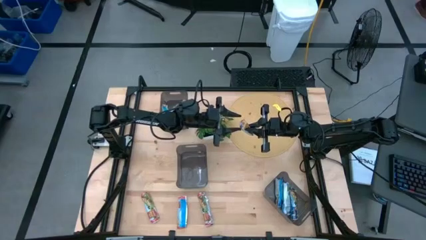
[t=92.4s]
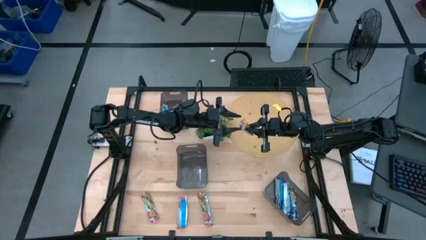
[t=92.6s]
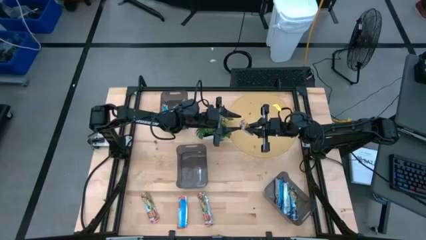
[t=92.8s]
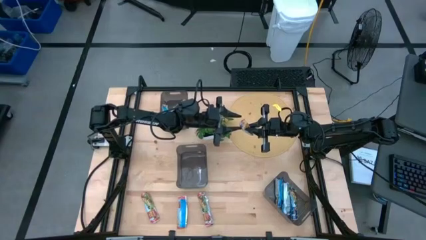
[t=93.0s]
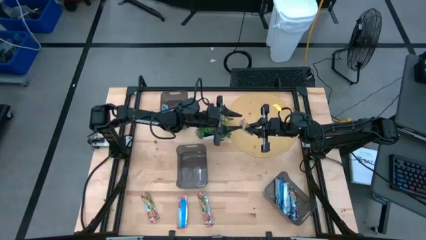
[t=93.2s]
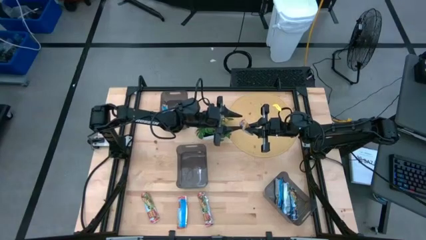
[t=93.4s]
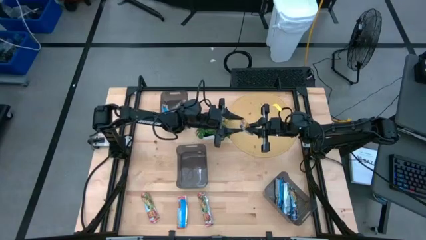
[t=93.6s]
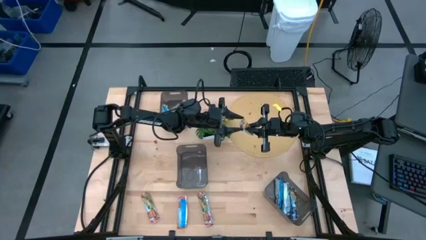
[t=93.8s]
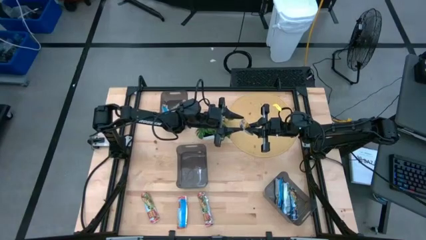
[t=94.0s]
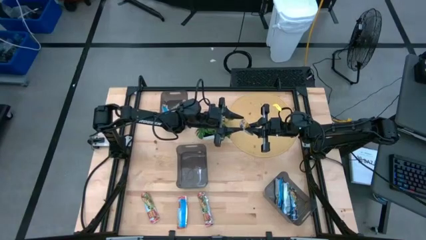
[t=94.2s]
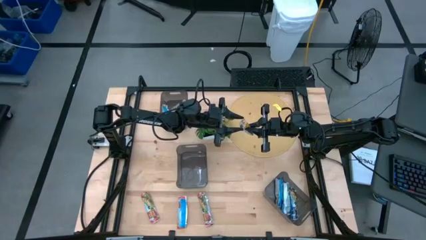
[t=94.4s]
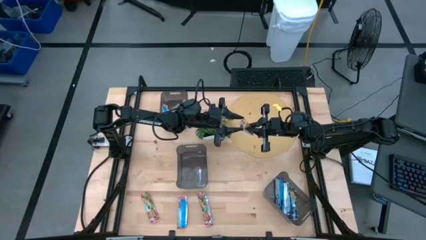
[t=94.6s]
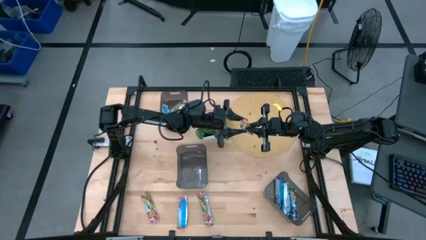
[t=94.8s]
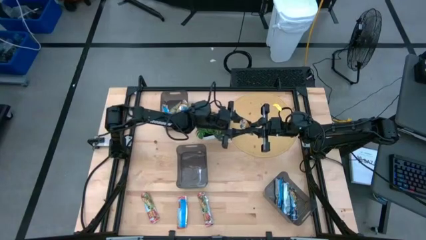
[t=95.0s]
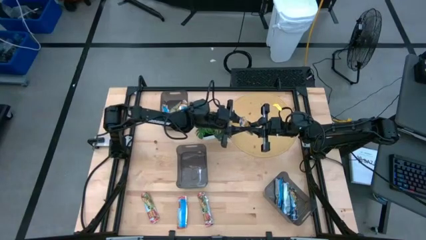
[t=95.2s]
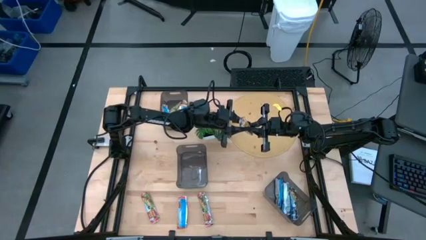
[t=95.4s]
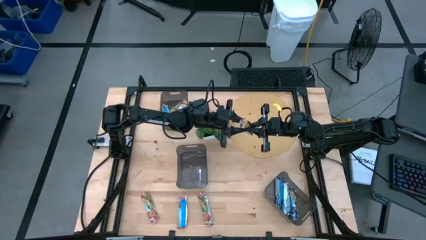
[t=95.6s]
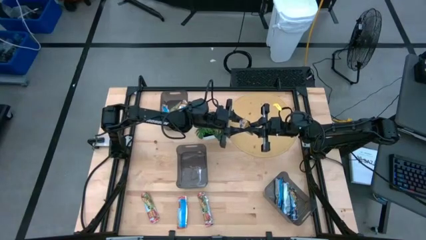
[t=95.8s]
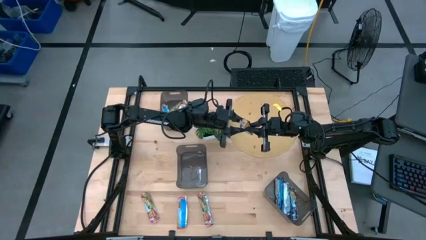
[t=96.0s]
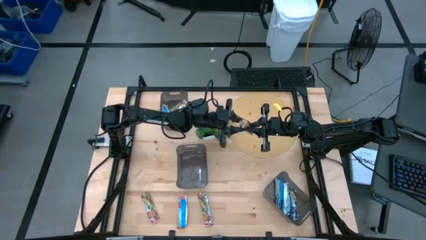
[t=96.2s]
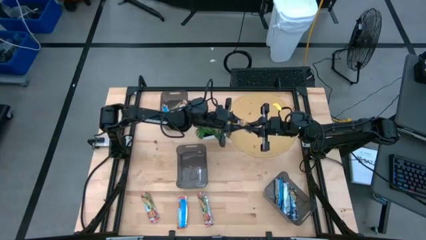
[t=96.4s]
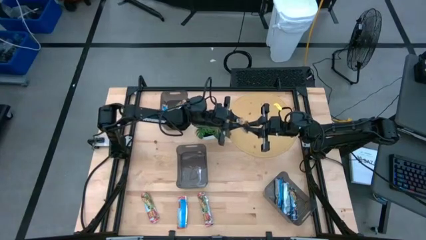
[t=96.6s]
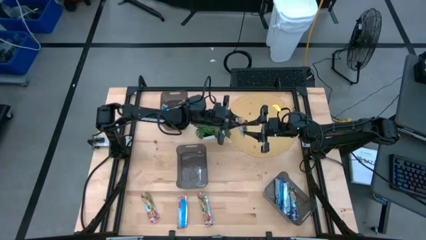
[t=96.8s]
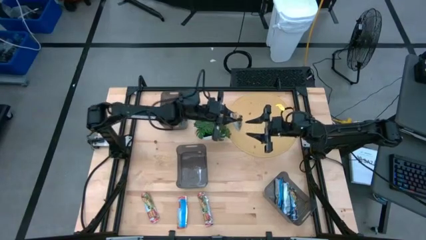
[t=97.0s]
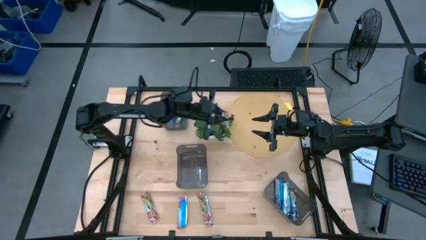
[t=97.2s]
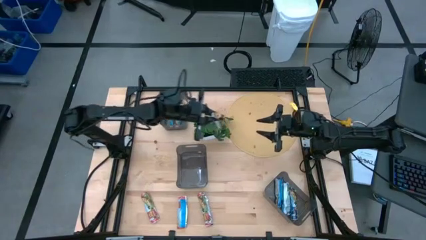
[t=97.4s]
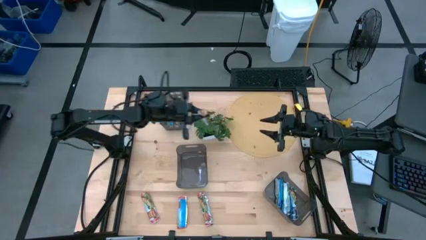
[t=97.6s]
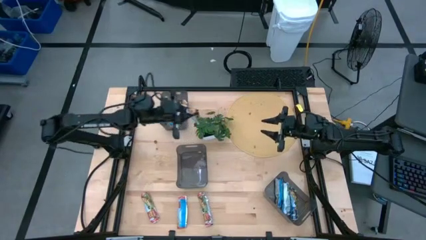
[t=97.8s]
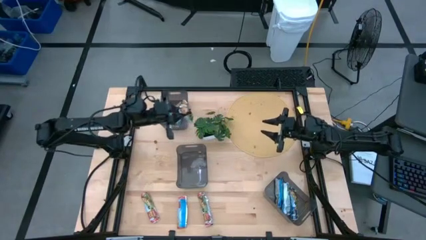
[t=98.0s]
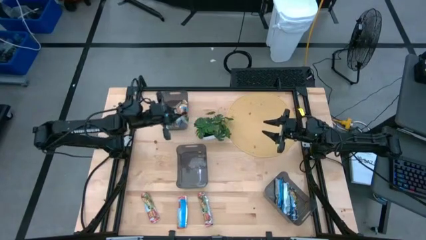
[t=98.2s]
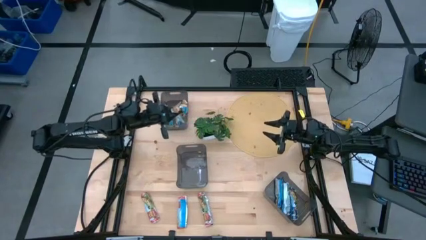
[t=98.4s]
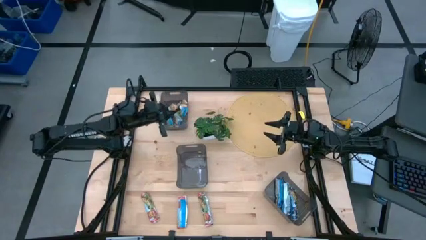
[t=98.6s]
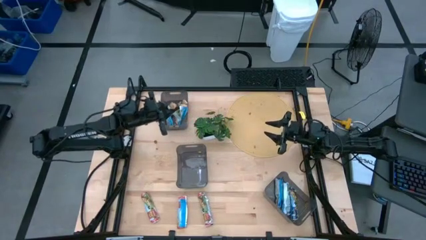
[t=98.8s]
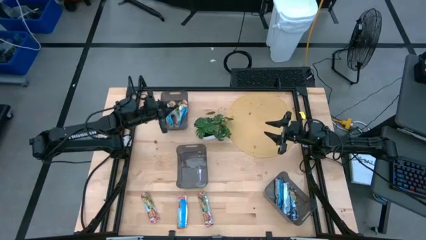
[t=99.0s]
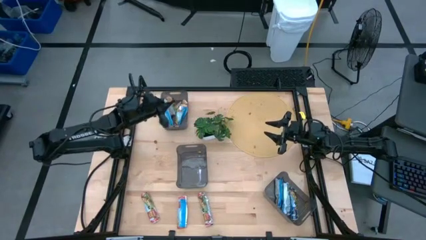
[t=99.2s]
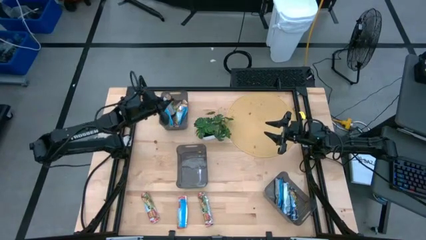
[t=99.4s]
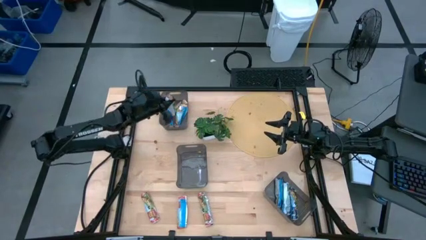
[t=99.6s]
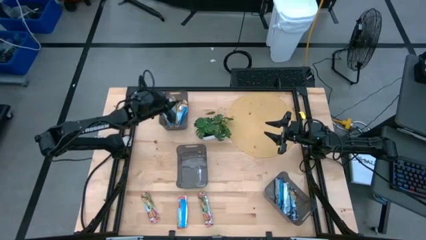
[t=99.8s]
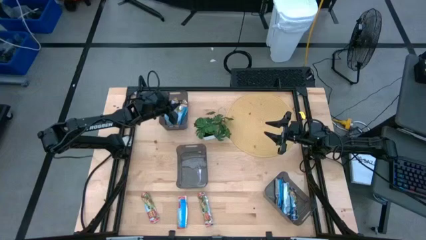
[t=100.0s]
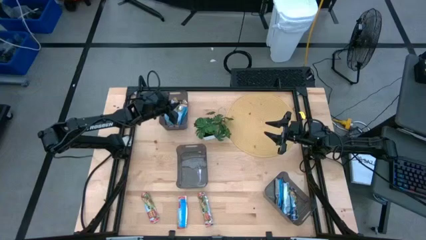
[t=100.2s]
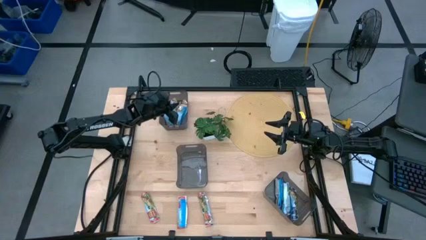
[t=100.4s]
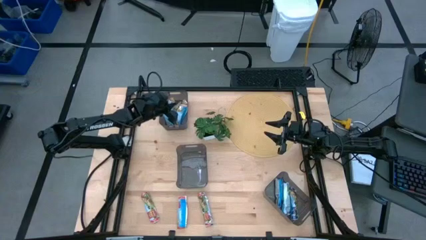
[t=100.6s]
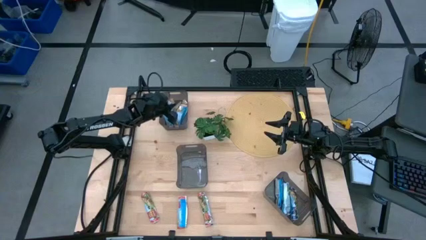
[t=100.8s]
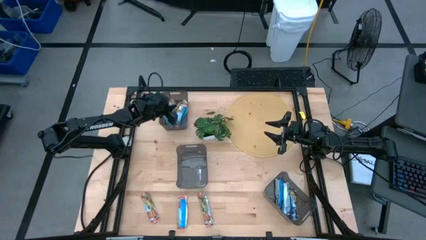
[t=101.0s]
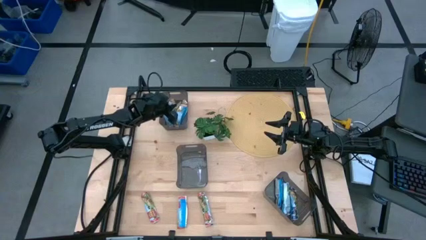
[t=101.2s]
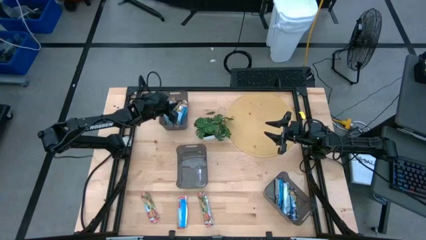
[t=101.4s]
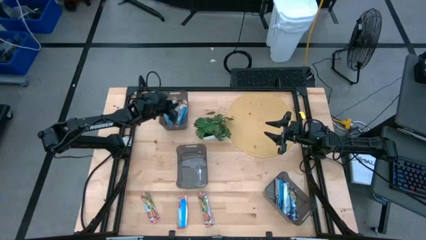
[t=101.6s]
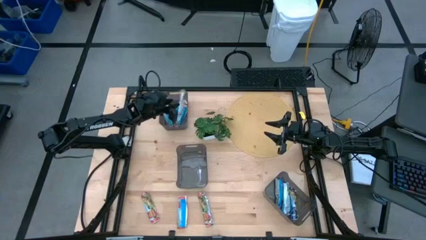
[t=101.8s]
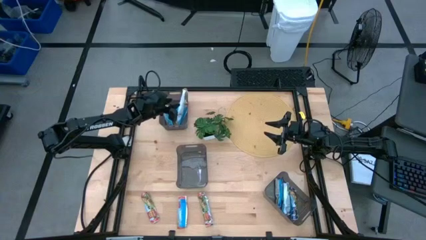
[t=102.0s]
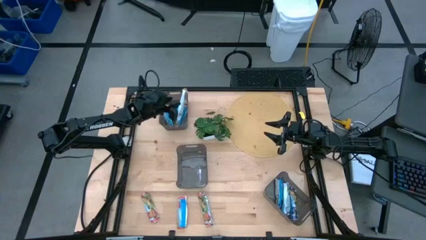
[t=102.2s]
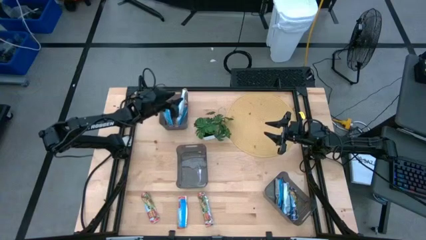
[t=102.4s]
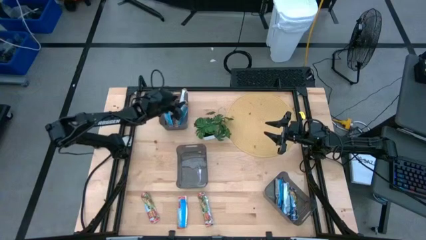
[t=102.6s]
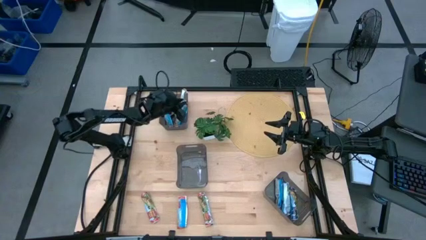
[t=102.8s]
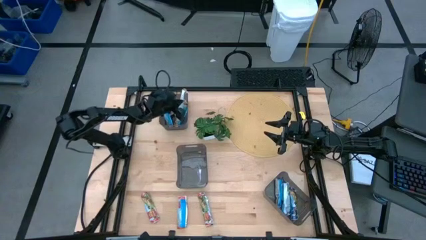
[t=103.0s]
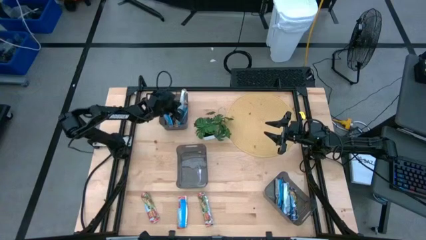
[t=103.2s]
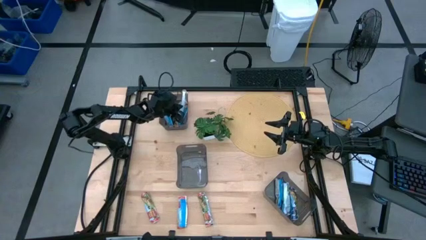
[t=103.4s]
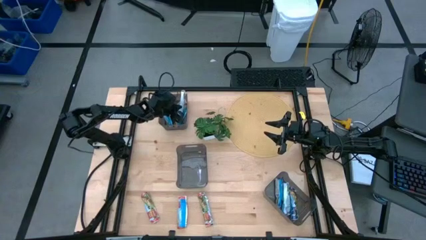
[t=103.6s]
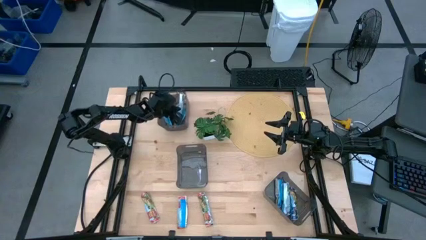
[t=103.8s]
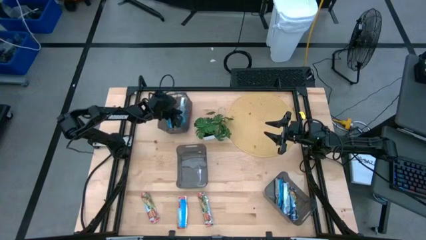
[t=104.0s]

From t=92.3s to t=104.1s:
Task: Pick and place Granola Bars by type
Put the orange granola bar into the top black bin

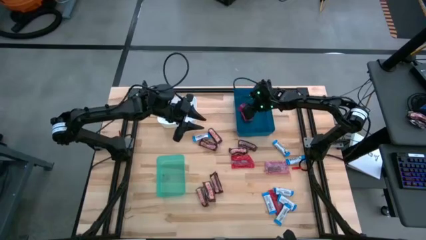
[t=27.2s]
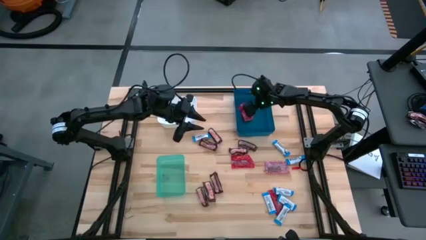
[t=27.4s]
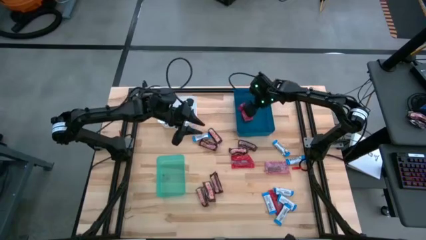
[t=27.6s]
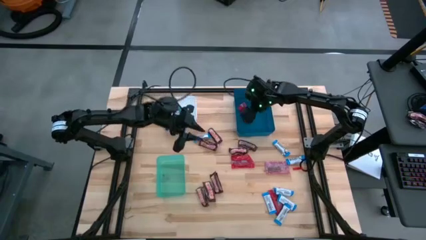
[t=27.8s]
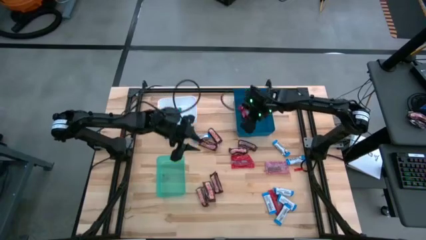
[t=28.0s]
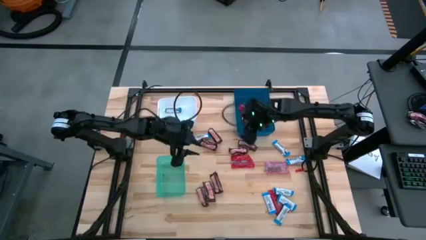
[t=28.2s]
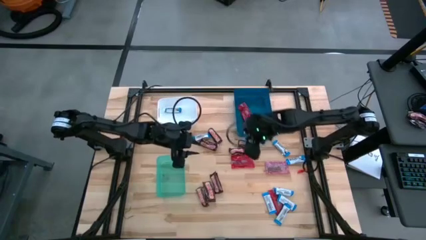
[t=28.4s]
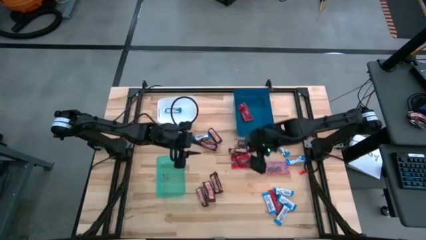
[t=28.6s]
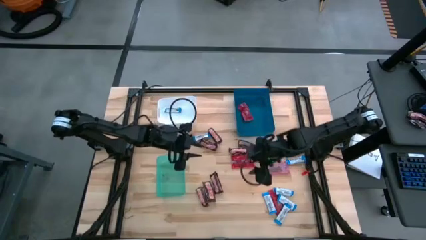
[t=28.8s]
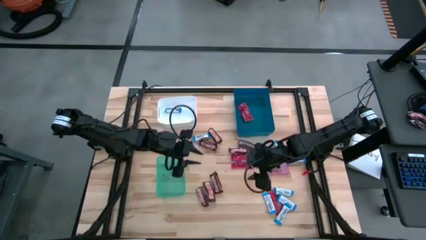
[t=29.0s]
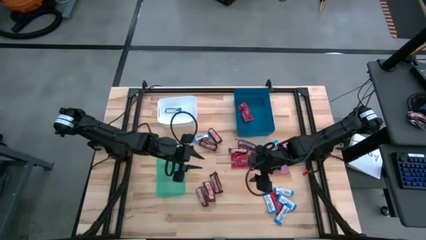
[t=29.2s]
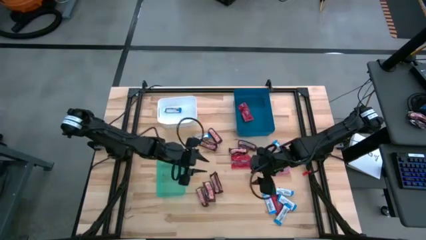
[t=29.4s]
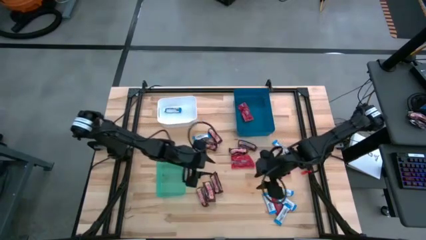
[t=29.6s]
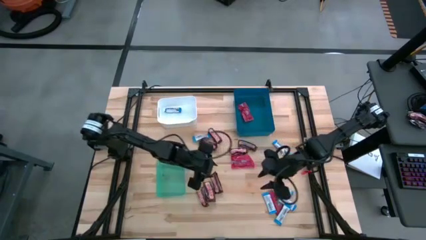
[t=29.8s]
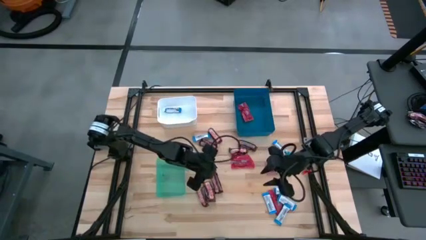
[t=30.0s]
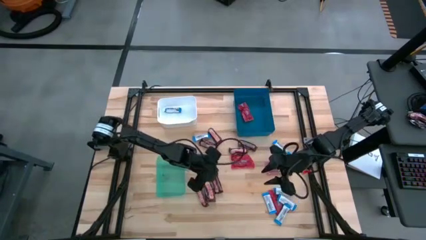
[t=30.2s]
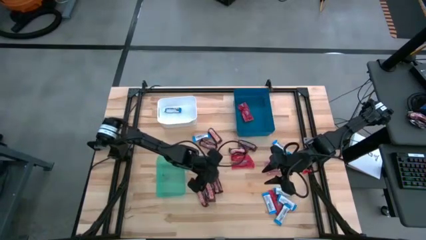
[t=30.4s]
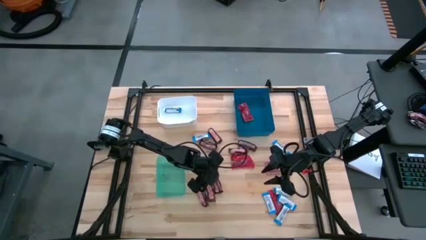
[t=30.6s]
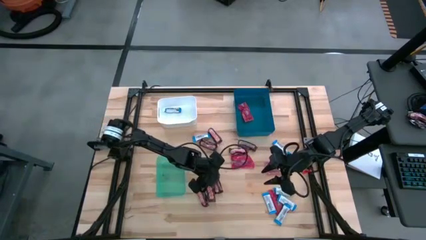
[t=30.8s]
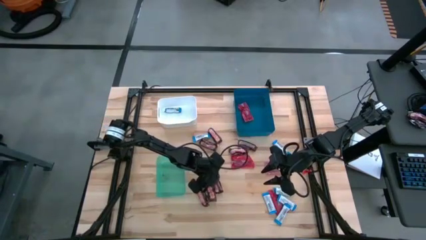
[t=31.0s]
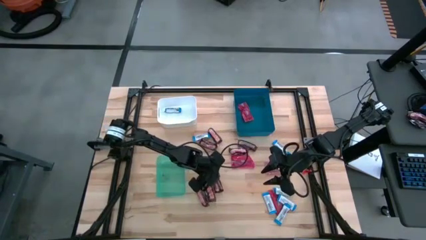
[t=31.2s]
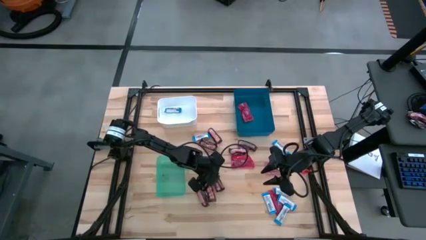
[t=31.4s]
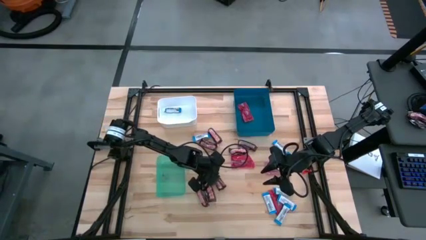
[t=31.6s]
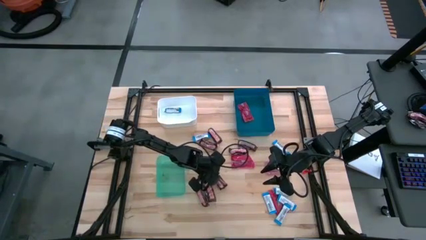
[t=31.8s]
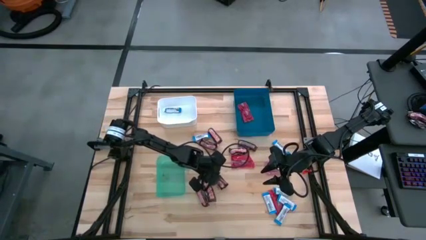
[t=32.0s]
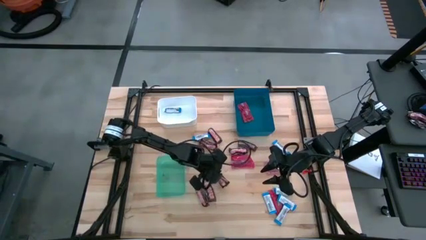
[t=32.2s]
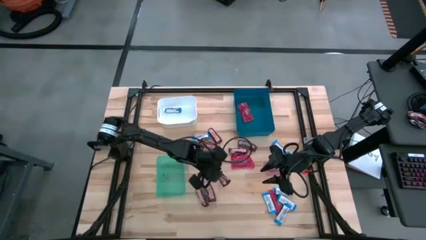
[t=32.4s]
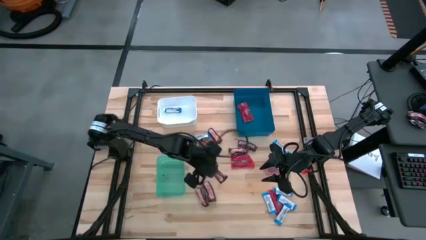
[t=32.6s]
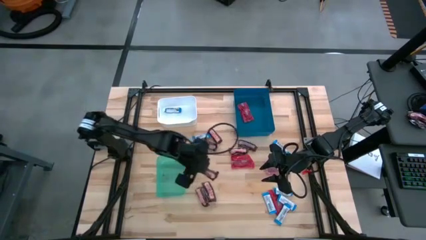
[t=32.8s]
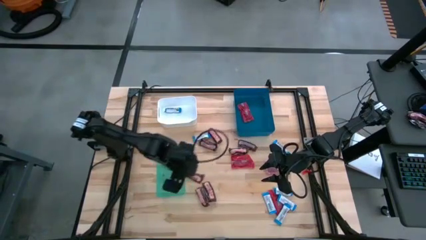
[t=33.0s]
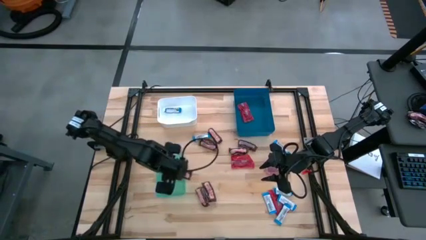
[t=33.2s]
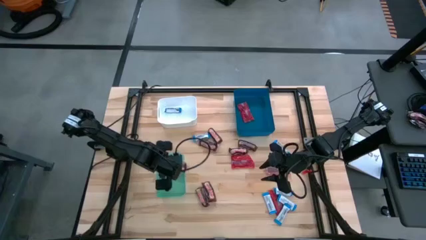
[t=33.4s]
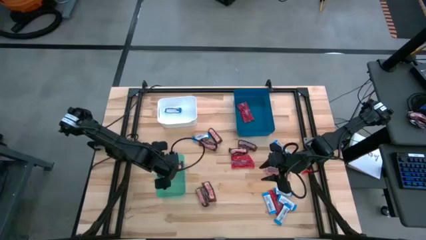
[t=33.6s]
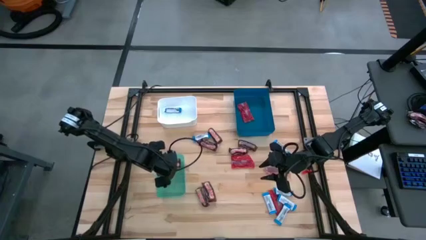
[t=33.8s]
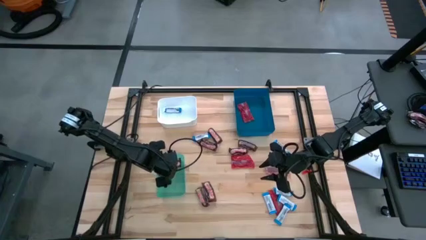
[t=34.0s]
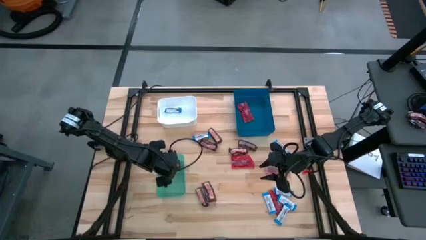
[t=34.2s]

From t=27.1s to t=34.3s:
Task: Sort candy
Put the brown chocolate bar into the green bin
